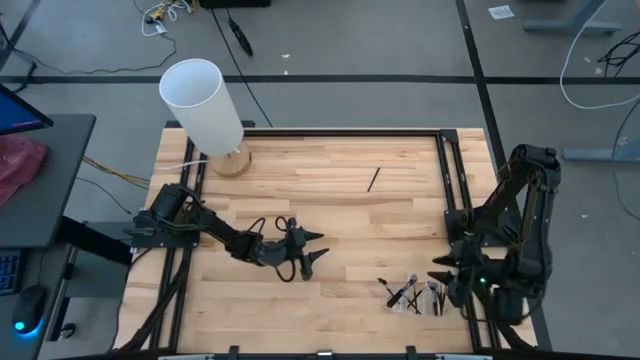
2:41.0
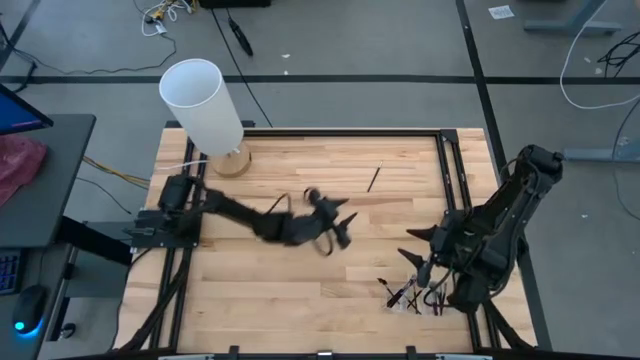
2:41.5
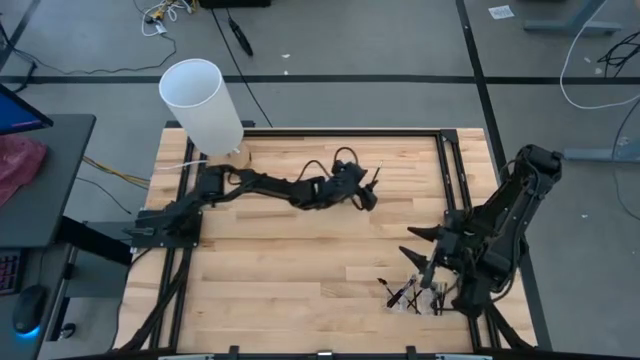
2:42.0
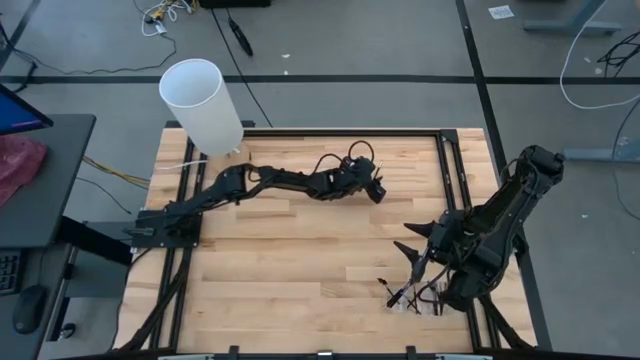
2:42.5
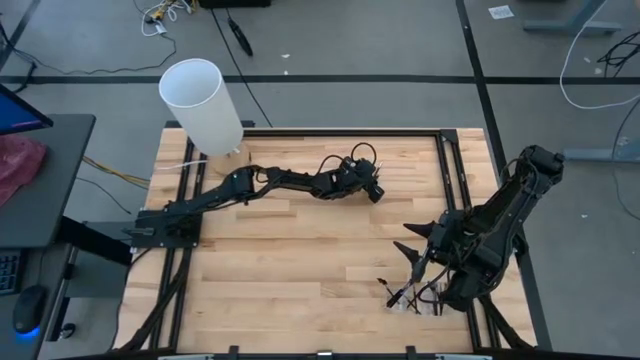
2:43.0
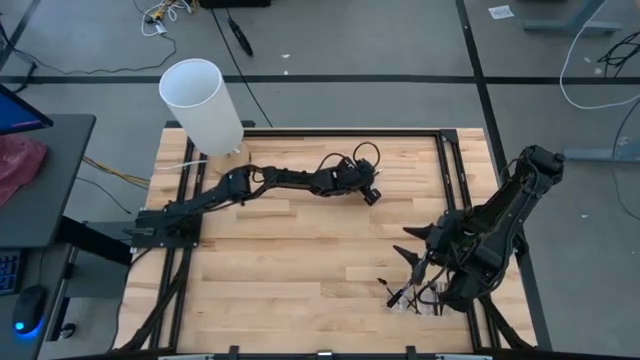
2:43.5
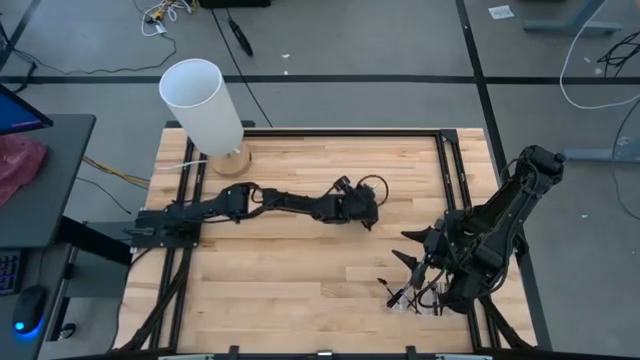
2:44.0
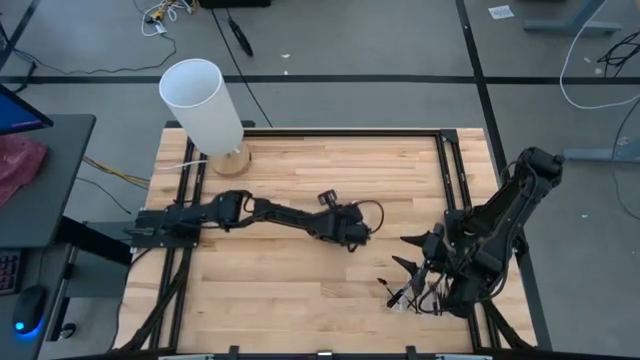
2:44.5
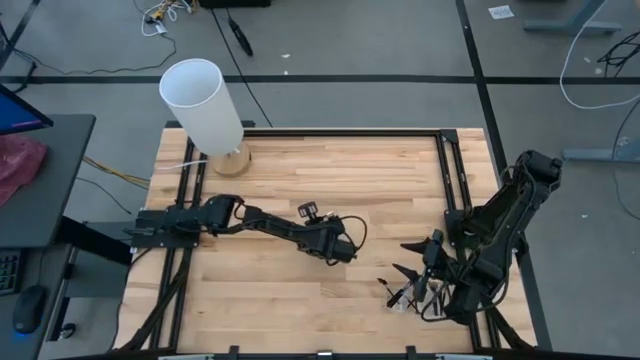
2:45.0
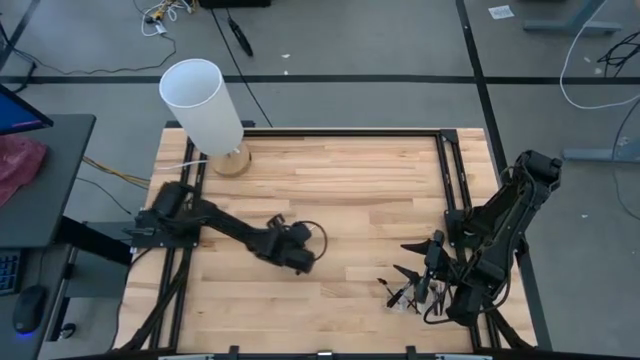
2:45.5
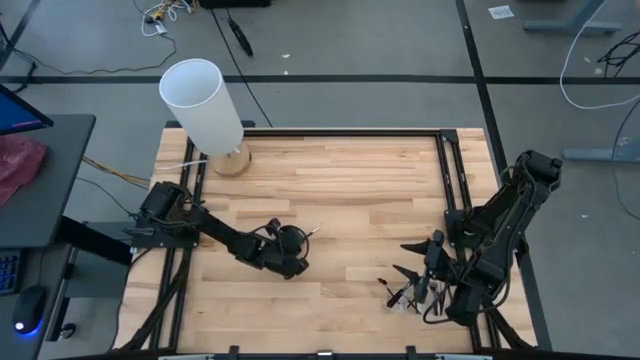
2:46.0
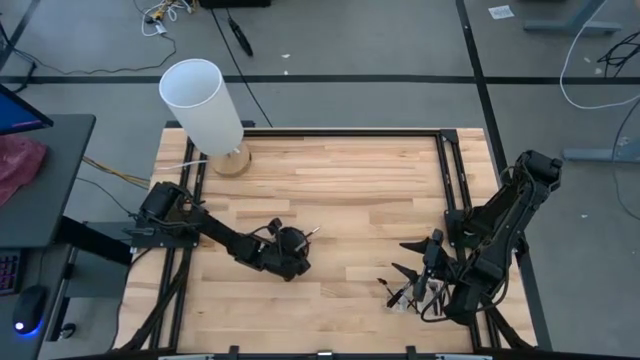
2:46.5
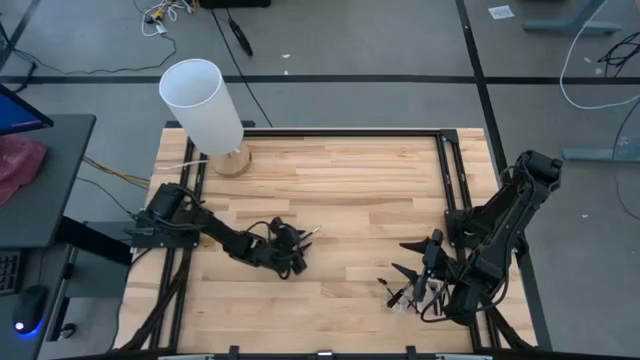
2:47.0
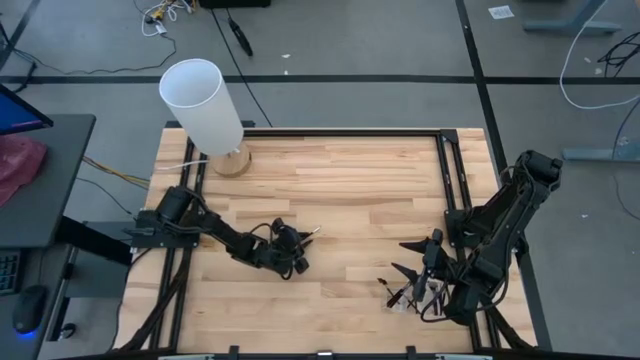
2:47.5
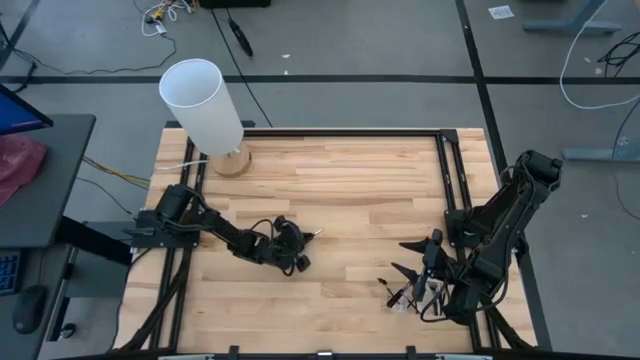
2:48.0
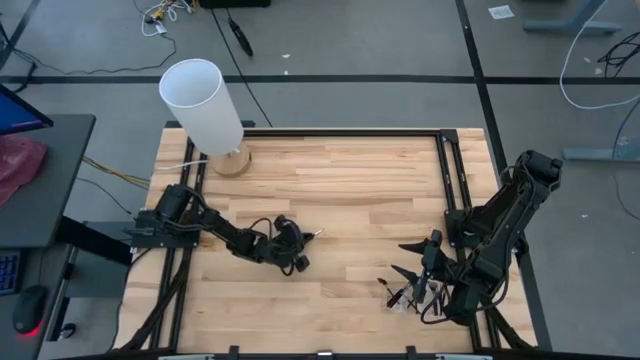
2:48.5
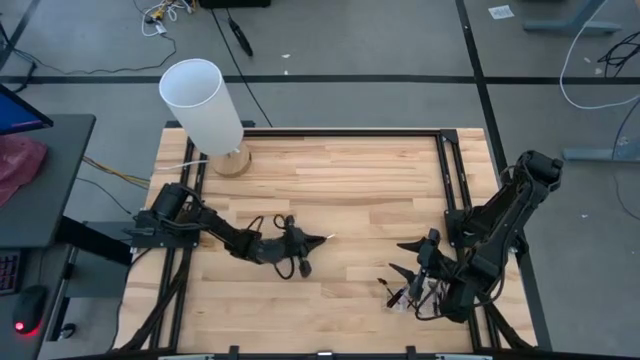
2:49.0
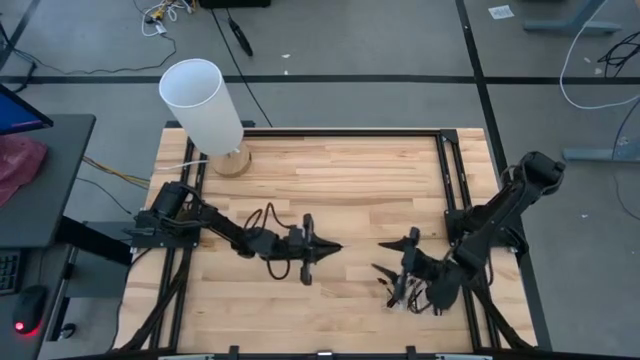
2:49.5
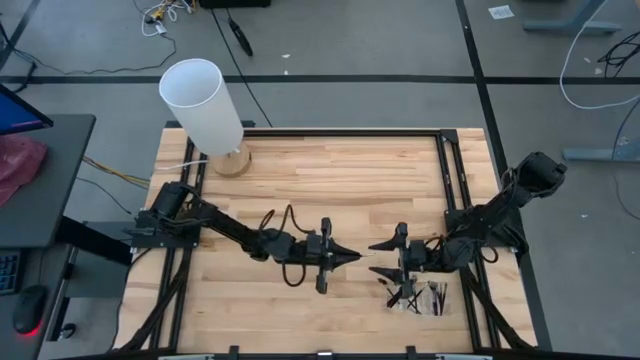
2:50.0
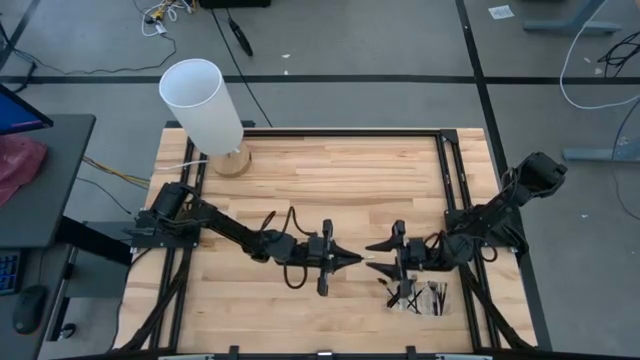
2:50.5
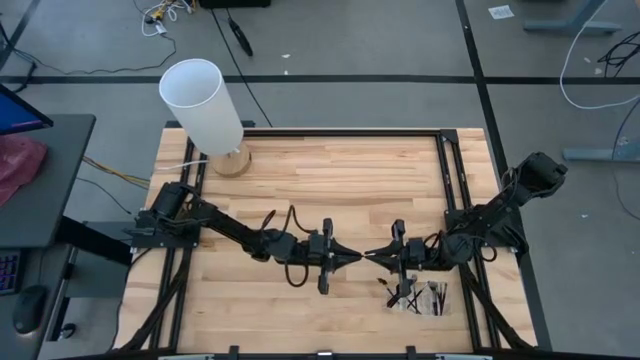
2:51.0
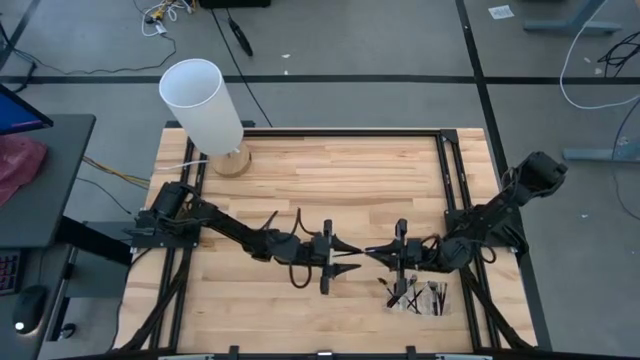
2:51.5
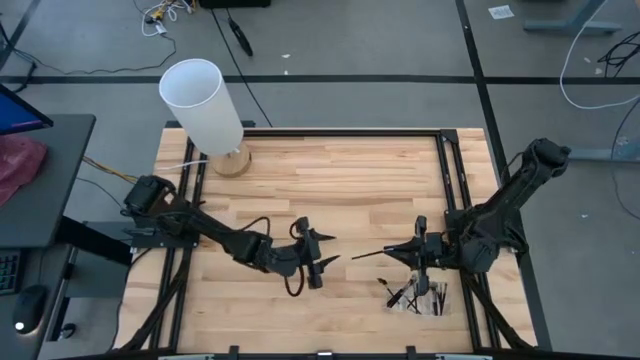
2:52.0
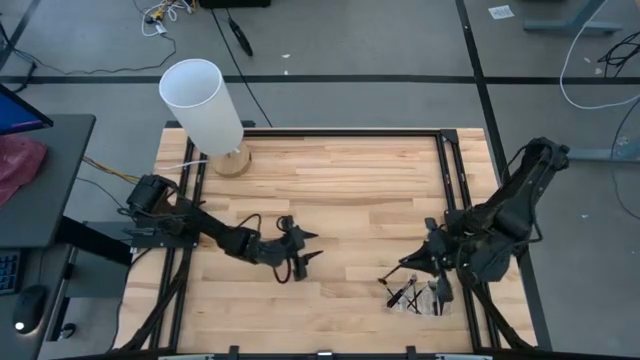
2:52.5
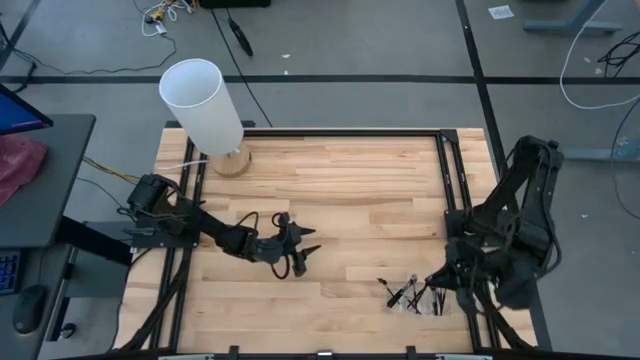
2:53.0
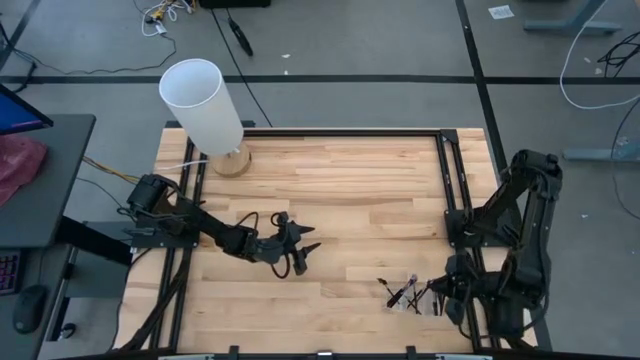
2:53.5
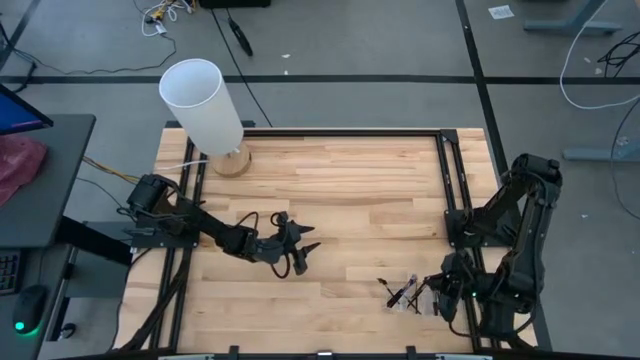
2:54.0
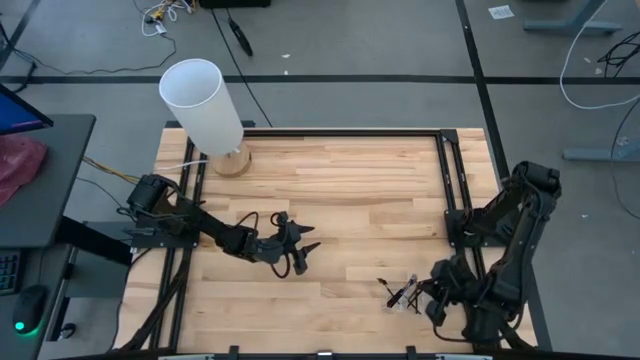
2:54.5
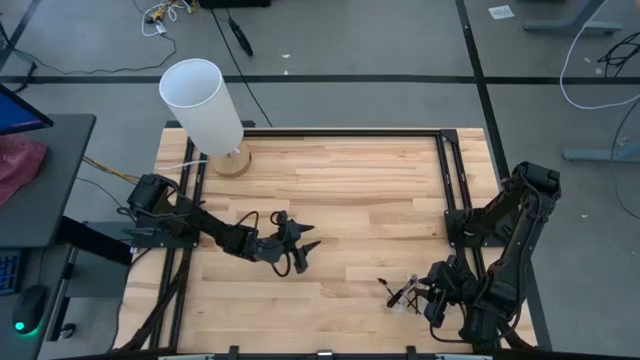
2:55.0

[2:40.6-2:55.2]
Task: Pick & Place Makeup Supplies
Put the silver makeup brush into the transparent organizer

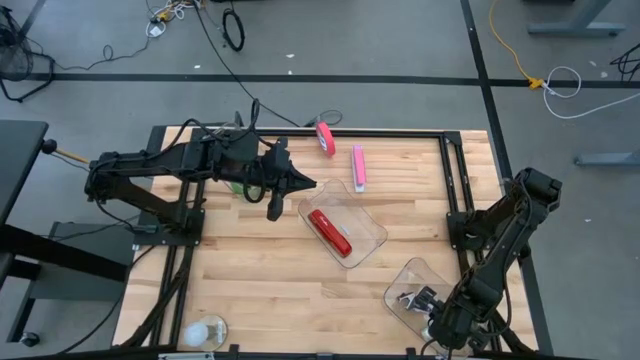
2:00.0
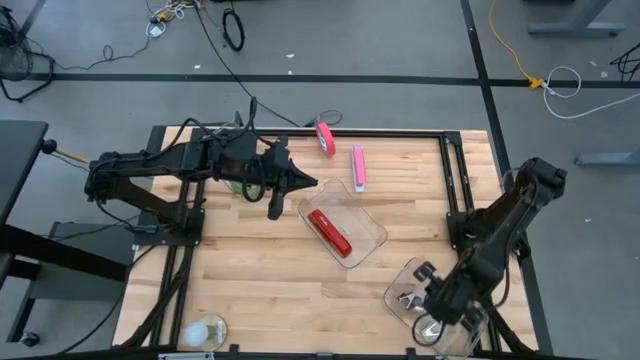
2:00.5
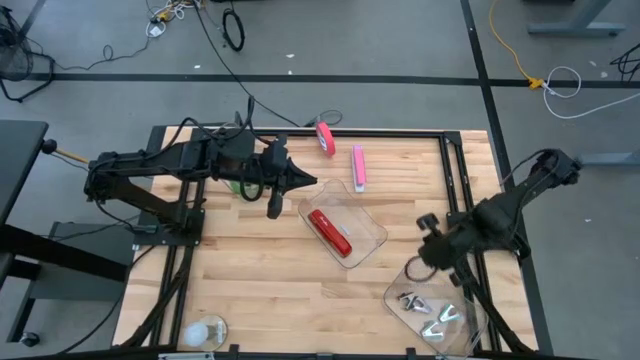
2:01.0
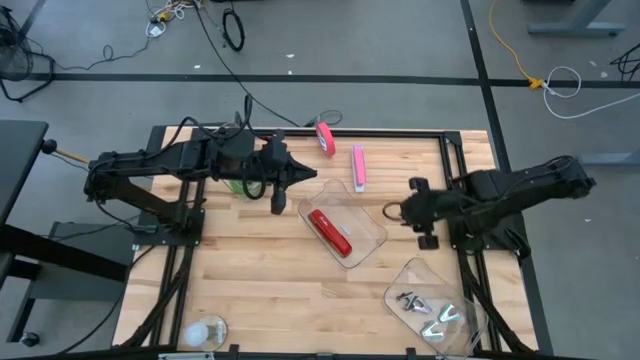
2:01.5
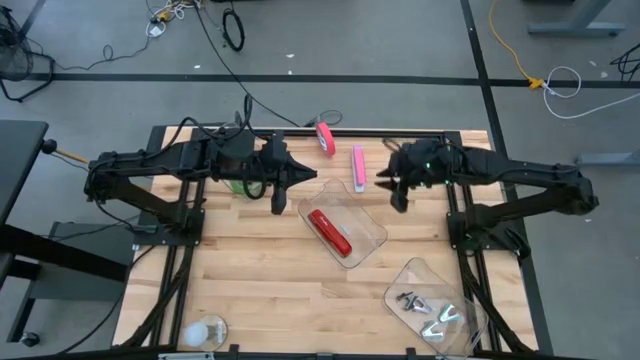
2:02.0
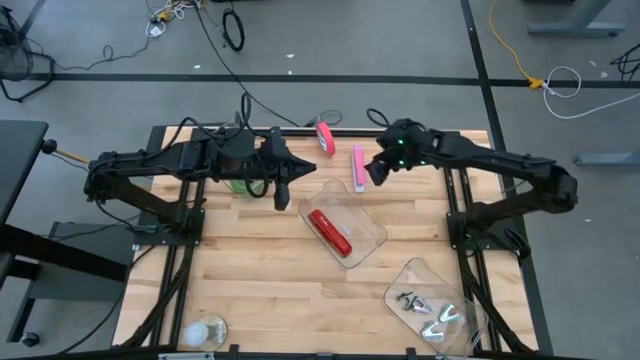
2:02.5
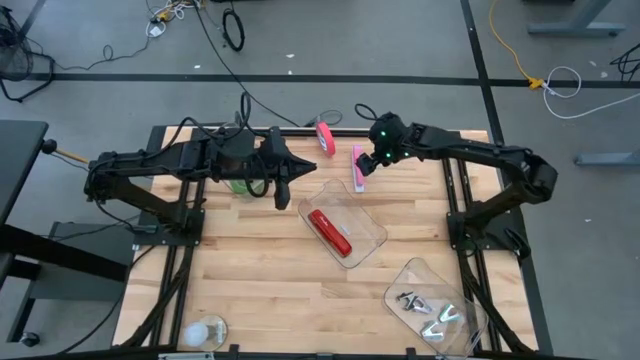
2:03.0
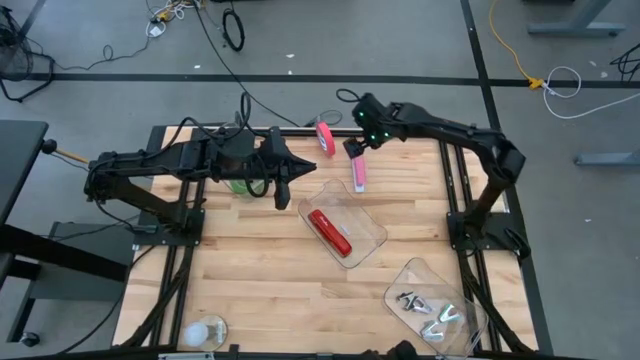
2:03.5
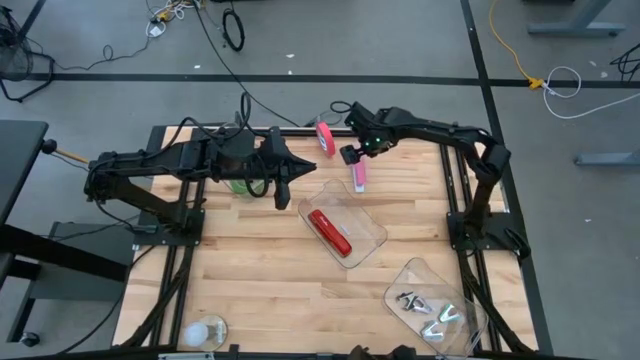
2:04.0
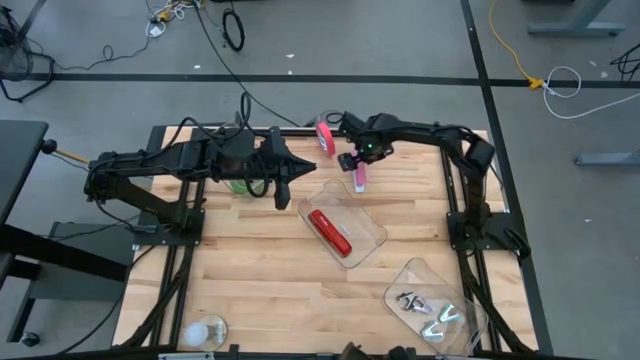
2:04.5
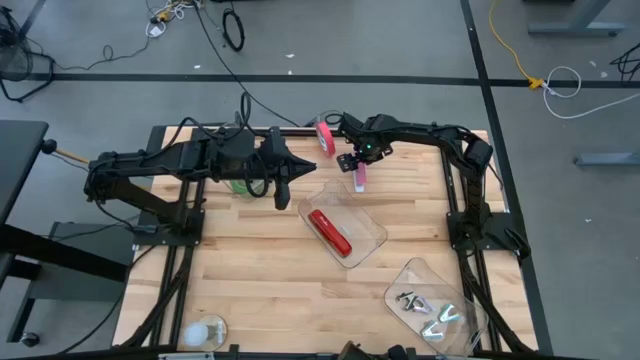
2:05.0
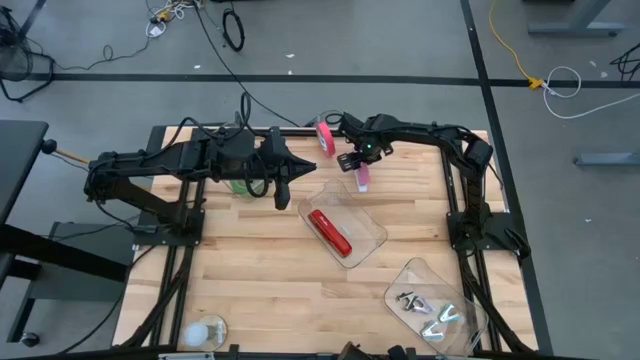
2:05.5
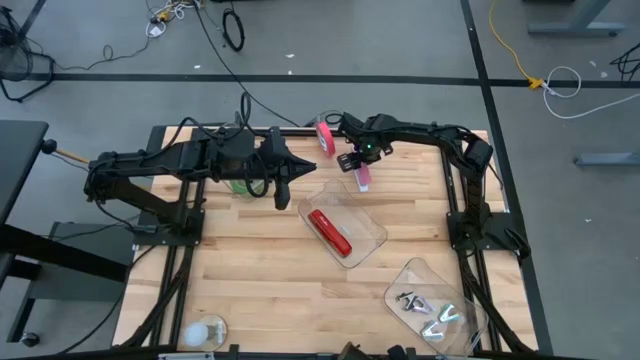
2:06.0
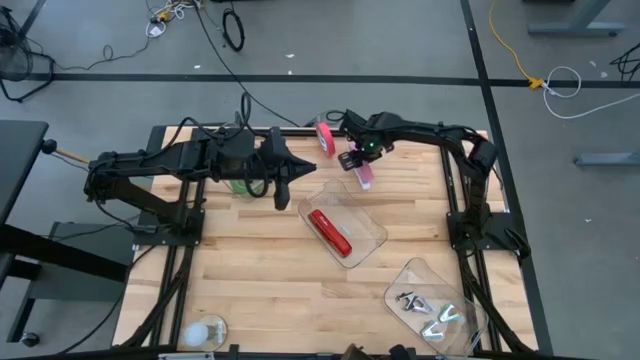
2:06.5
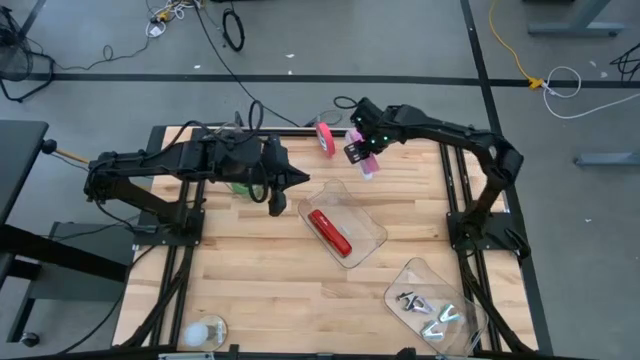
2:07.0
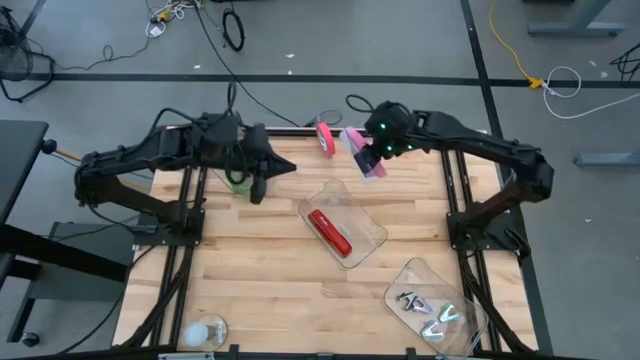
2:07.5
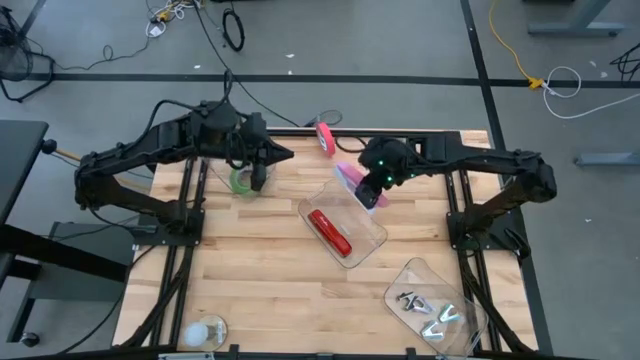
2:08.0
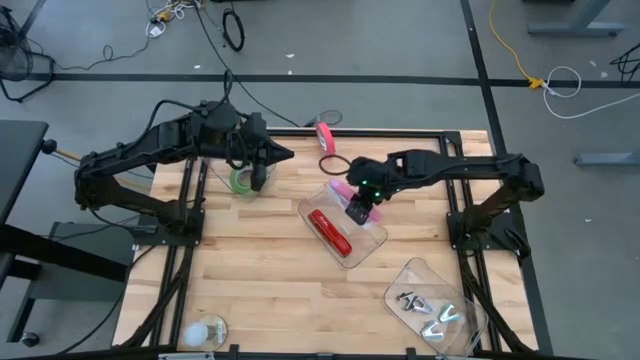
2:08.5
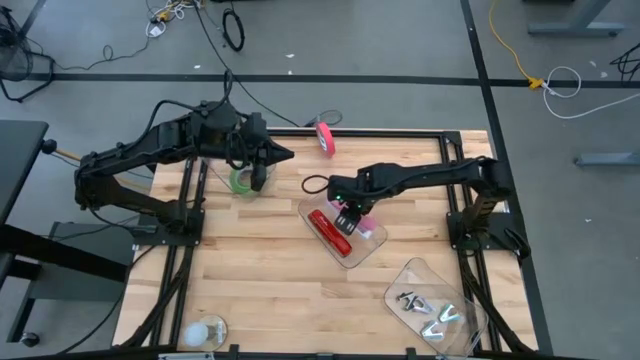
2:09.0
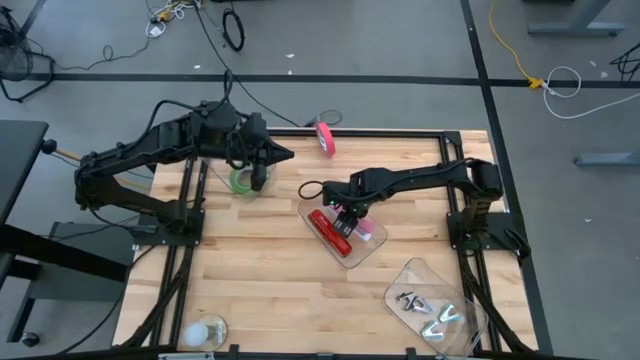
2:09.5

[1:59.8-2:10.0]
Task: Pick and place Stapler, Stapler remover, tape
Put the pink stapler into the center transparent bin
